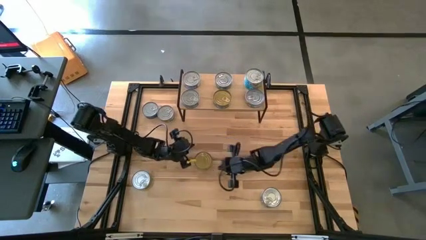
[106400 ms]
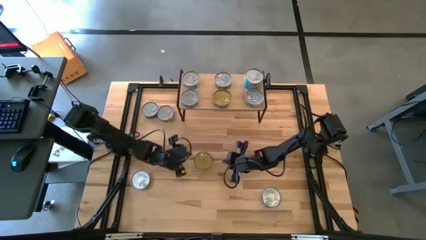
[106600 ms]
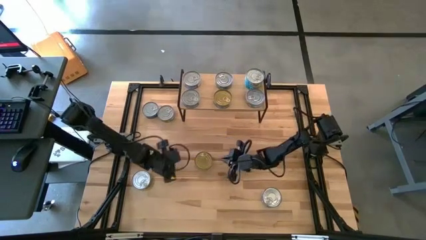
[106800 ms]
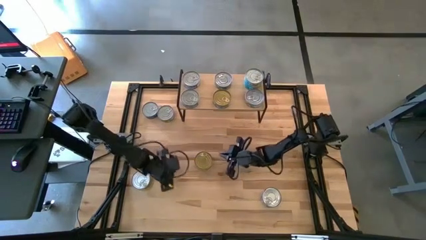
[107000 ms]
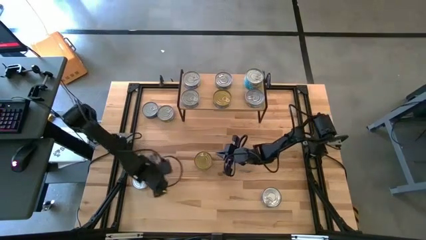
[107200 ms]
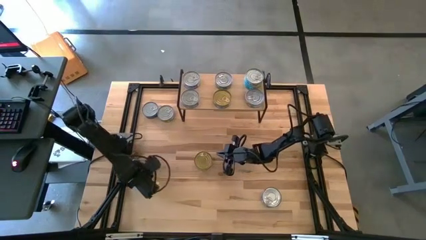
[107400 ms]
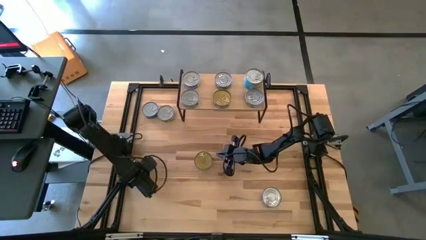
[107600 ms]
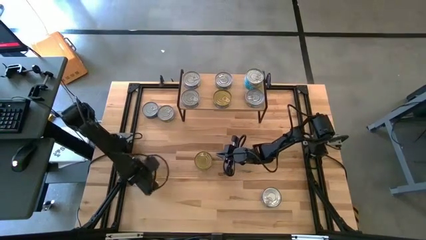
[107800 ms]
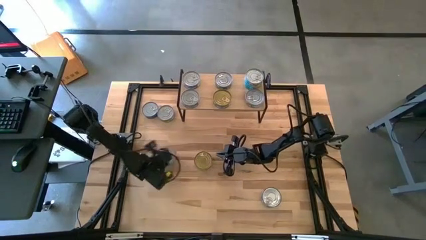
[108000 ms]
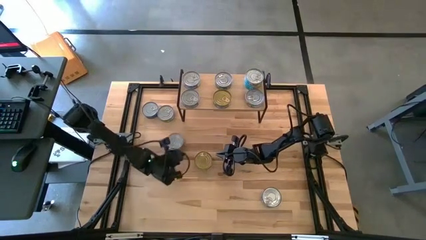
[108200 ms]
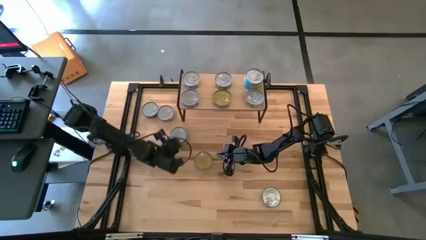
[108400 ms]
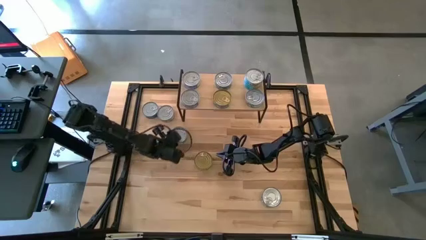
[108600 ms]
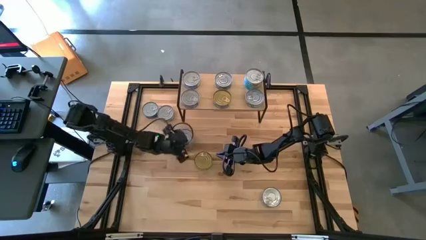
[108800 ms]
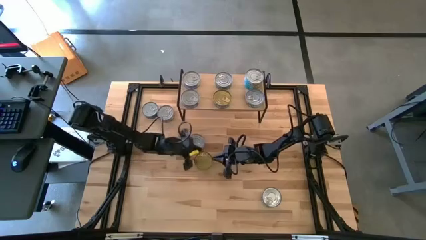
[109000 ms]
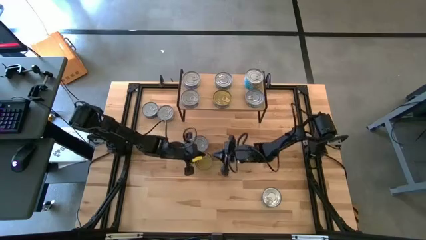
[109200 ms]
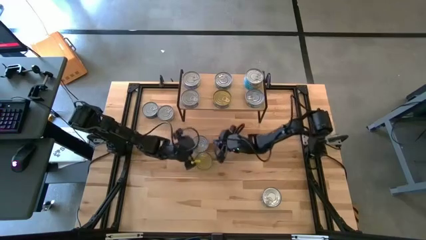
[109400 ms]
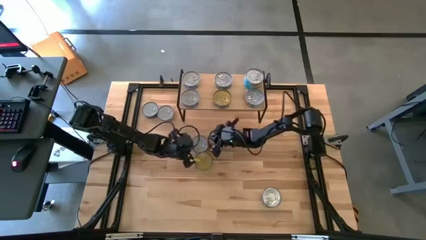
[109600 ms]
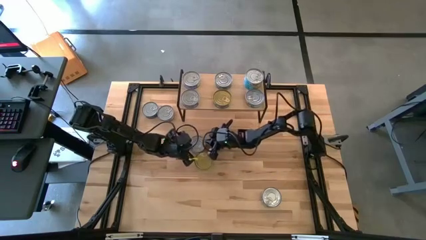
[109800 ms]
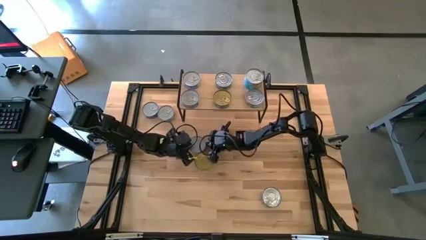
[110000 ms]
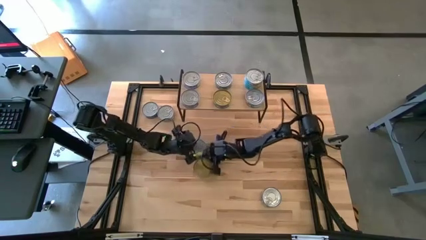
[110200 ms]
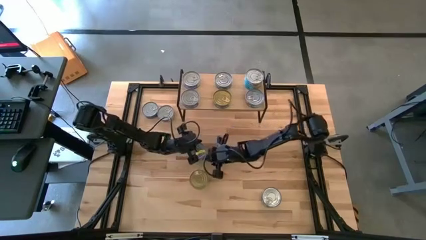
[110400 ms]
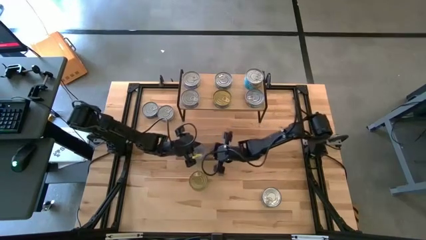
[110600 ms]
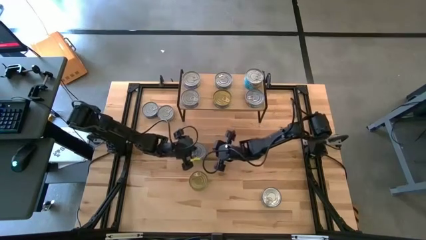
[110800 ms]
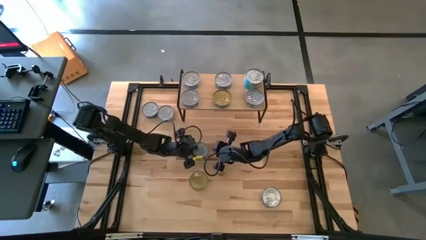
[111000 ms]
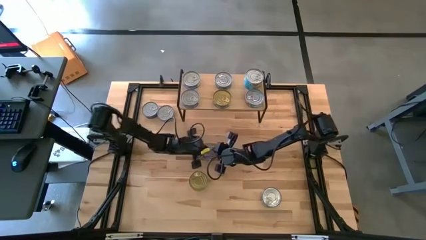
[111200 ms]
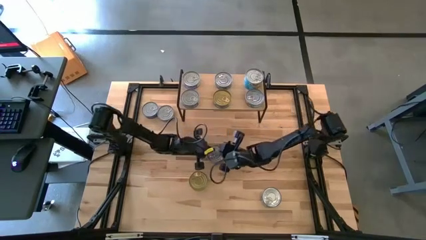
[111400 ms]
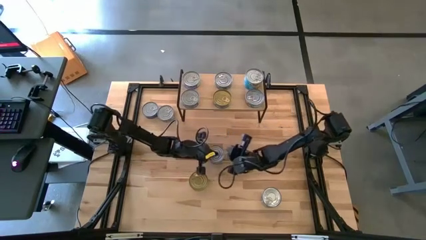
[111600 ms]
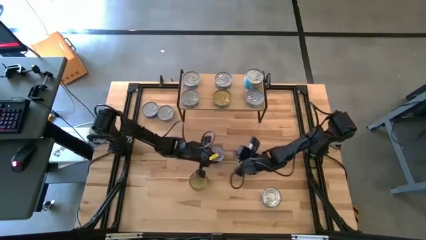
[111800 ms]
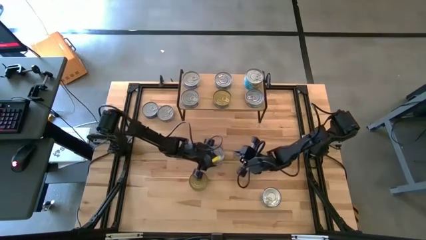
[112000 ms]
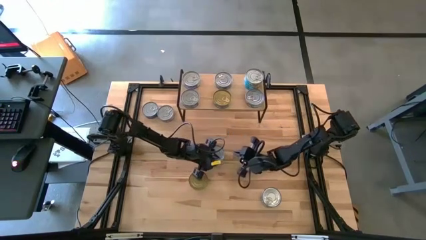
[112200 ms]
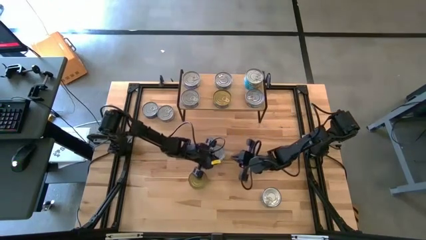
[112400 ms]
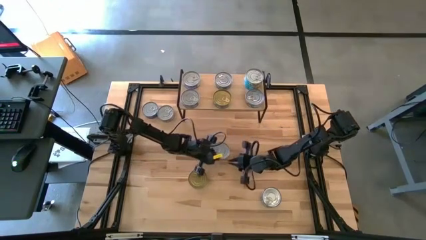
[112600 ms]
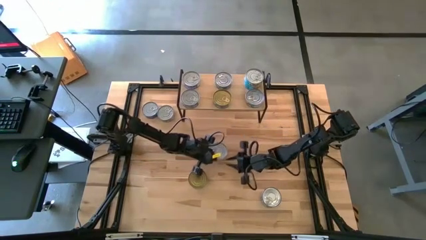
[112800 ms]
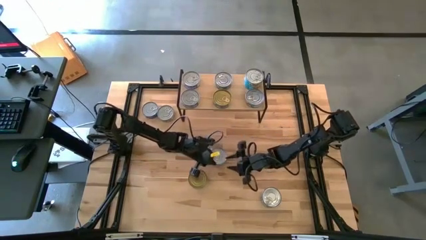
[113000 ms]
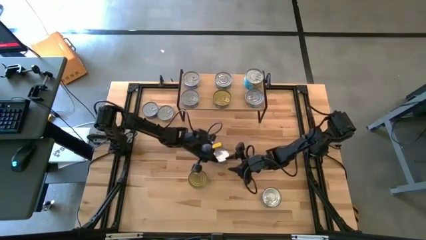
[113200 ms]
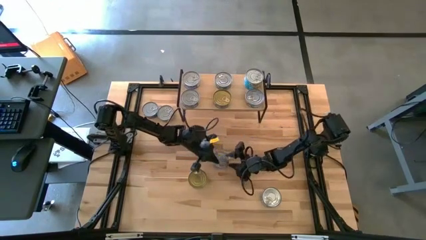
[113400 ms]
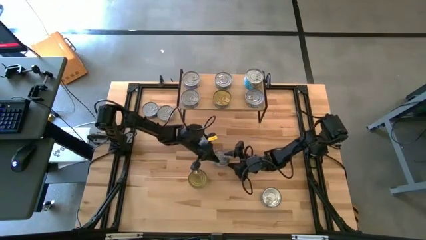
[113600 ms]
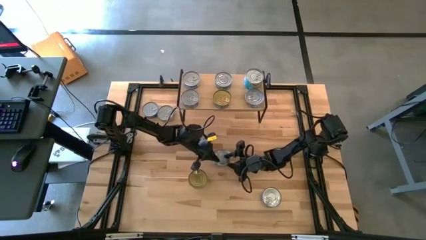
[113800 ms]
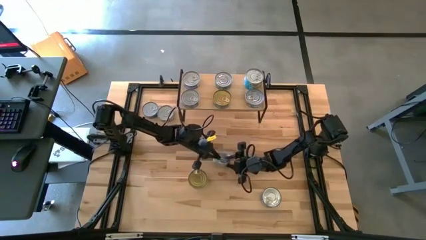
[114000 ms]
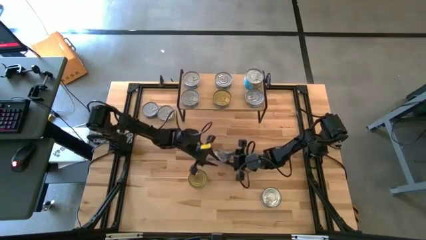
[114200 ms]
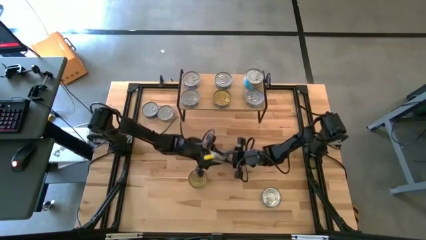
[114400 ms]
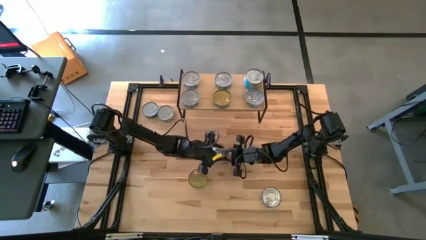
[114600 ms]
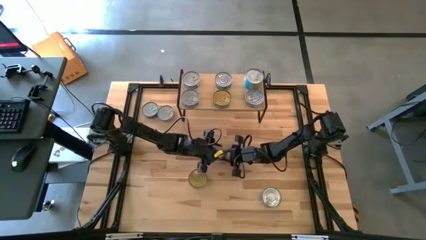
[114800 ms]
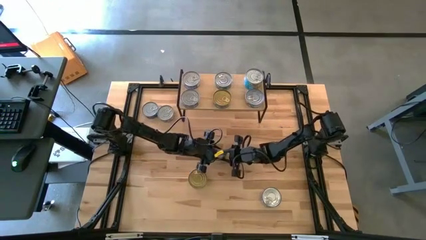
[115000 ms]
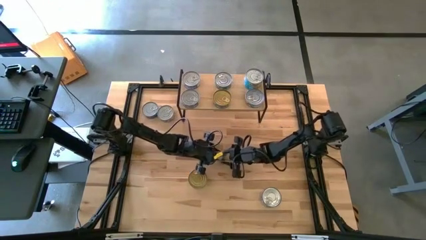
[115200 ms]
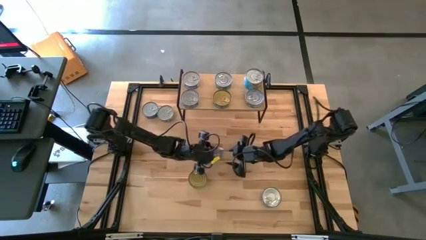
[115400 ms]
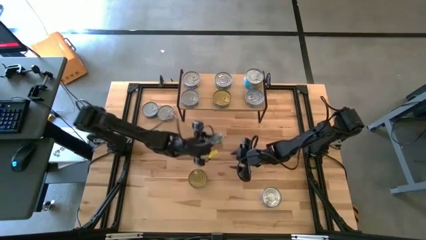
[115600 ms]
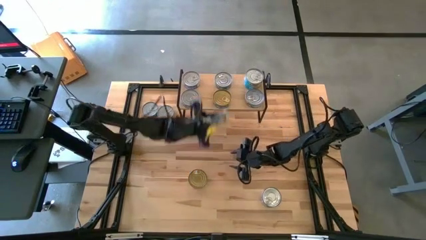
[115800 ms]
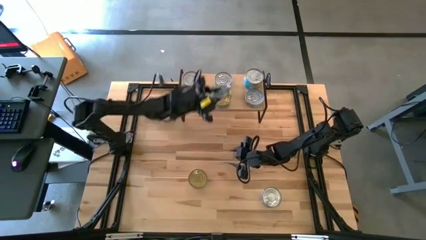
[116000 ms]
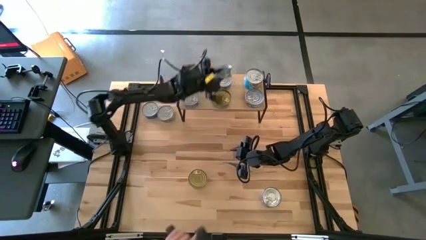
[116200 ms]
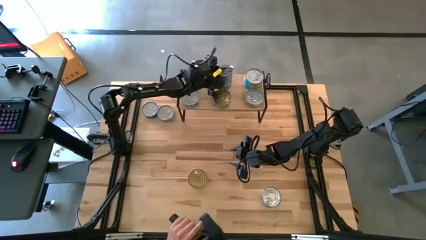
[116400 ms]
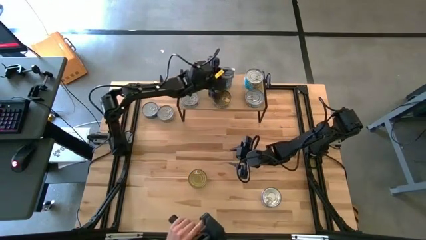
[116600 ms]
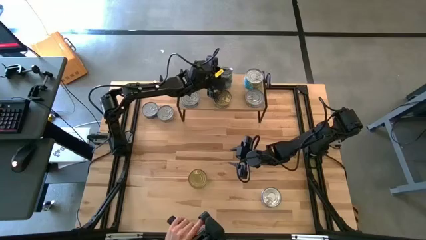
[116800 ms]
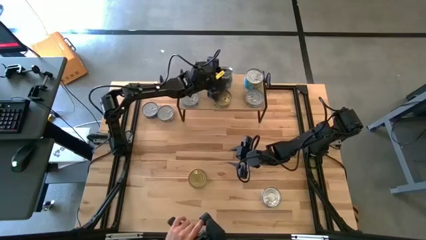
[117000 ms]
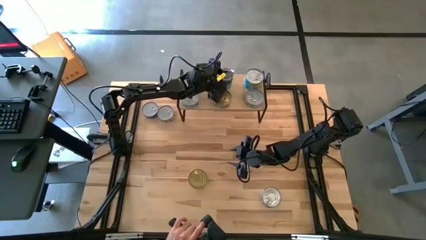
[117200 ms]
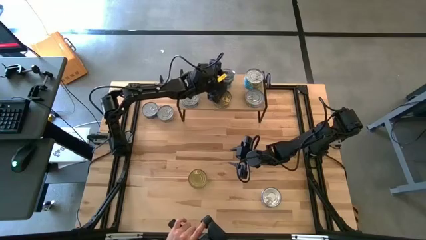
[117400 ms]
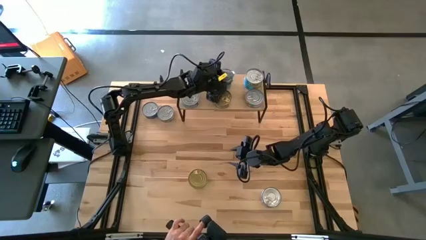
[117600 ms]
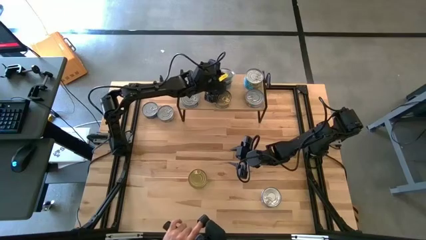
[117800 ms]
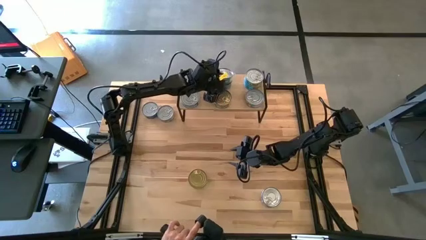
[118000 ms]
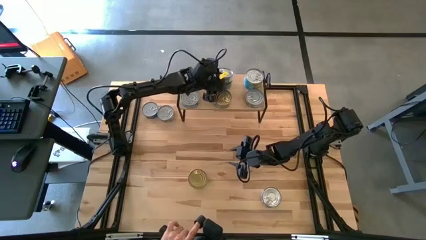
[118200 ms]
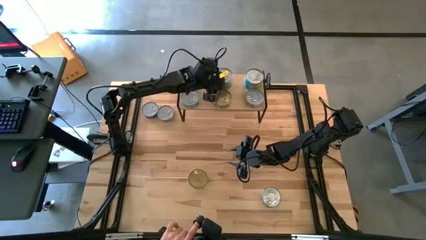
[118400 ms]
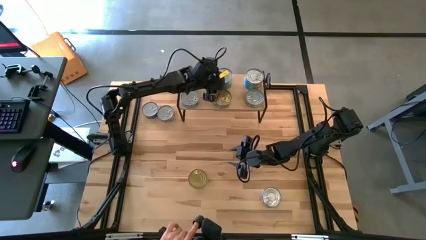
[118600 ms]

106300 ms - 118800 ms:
Task: Stack canned seafood by type on shelf
Stack the green tuna can on top of the green tuna can on the shelf
